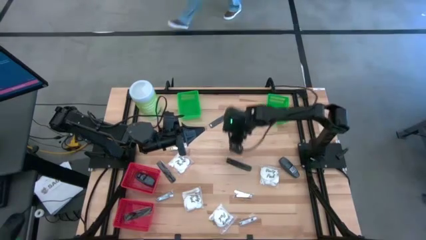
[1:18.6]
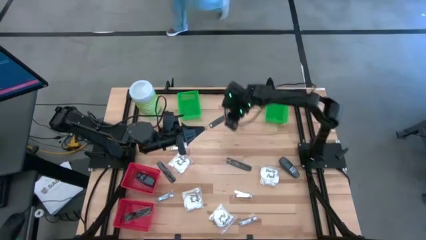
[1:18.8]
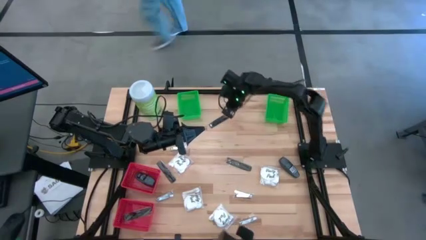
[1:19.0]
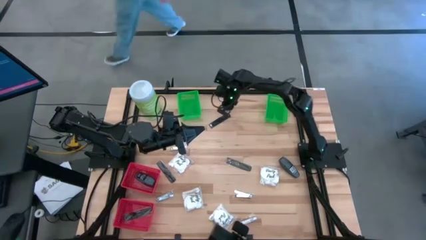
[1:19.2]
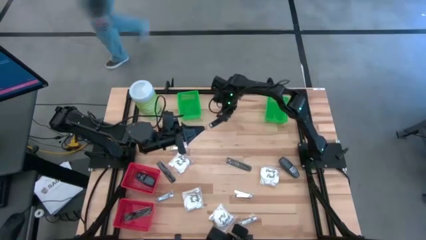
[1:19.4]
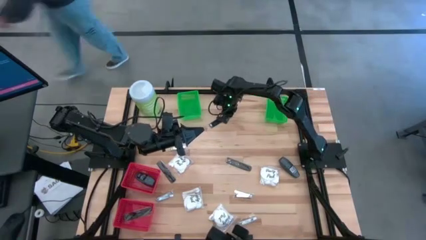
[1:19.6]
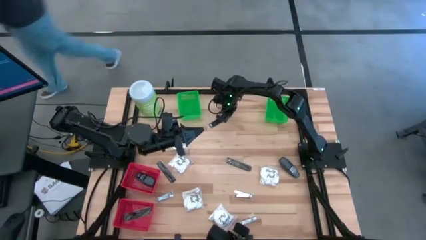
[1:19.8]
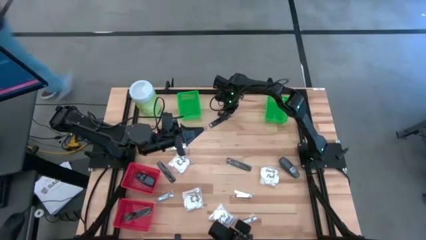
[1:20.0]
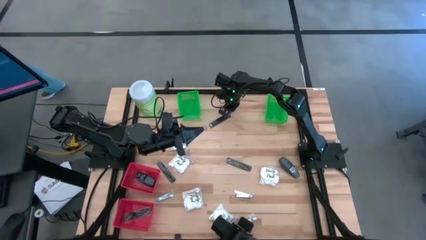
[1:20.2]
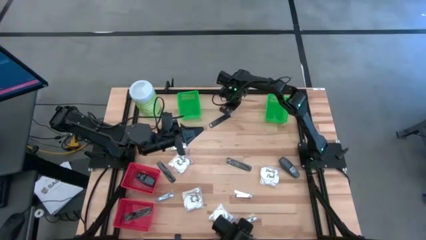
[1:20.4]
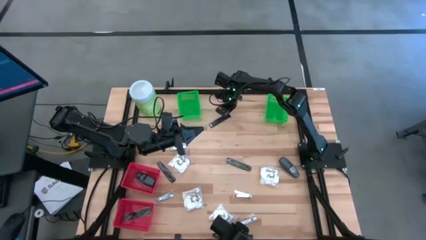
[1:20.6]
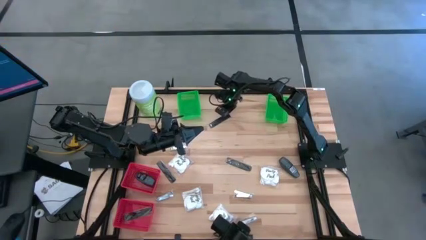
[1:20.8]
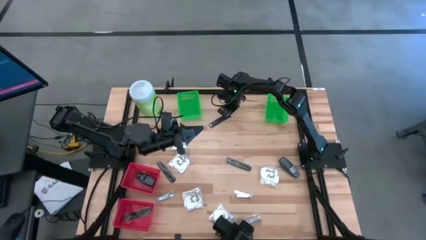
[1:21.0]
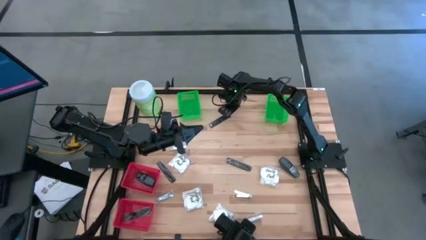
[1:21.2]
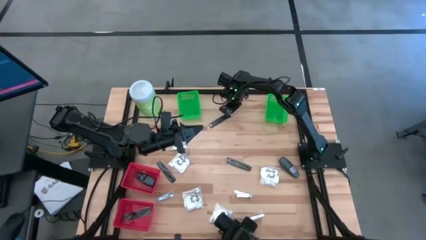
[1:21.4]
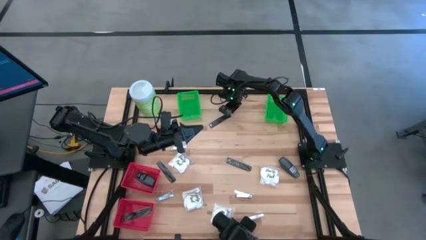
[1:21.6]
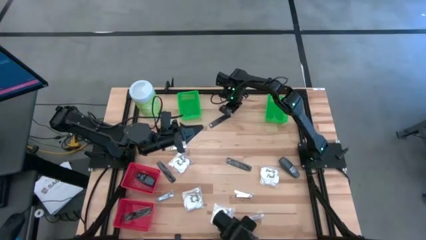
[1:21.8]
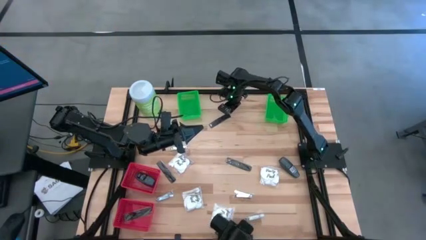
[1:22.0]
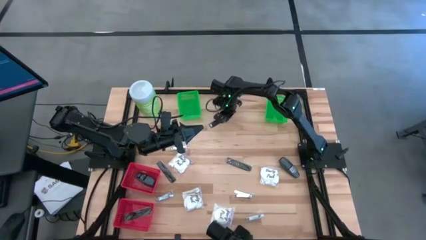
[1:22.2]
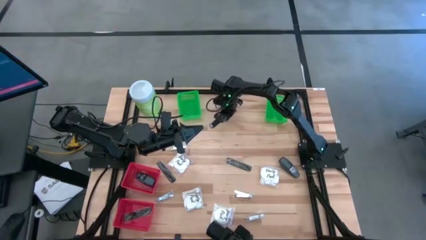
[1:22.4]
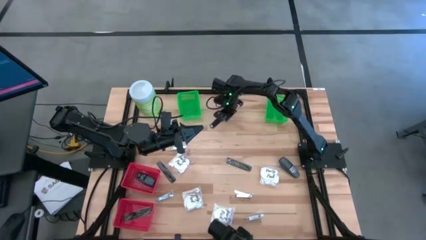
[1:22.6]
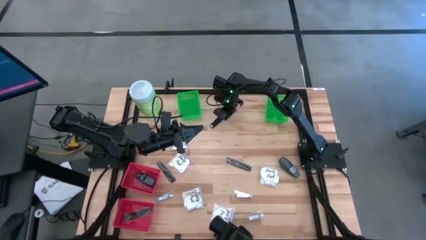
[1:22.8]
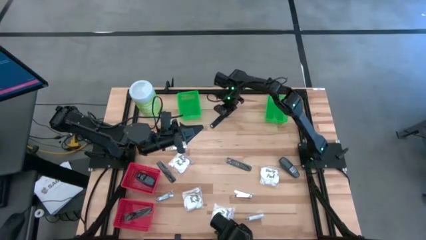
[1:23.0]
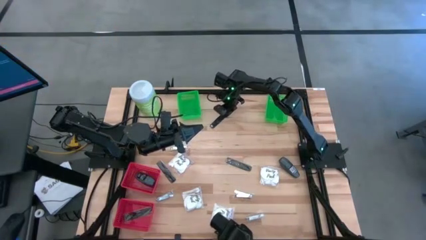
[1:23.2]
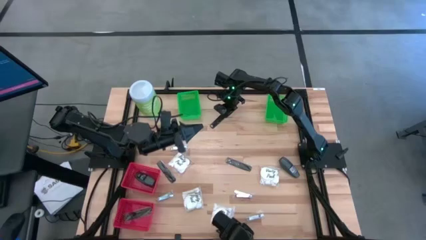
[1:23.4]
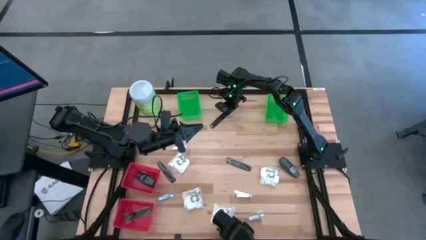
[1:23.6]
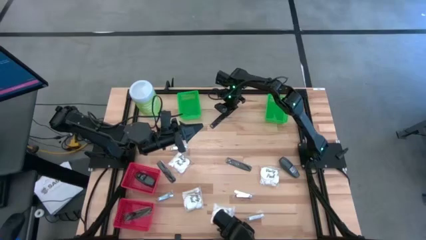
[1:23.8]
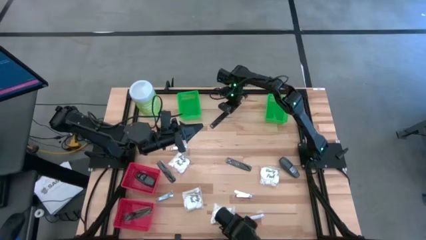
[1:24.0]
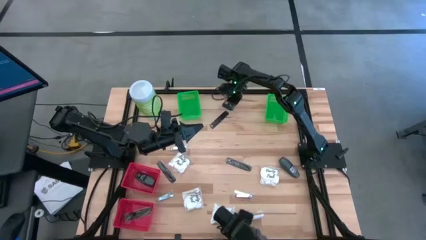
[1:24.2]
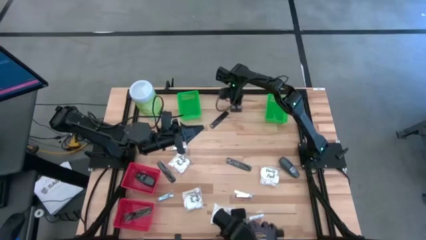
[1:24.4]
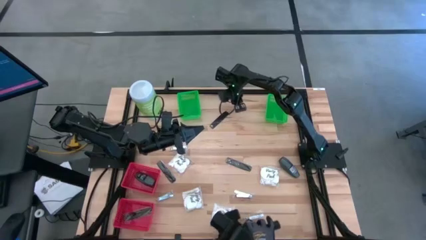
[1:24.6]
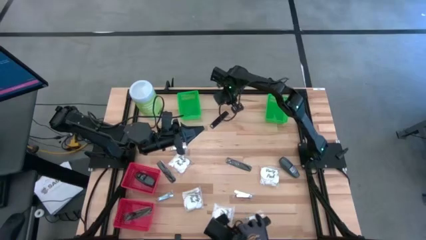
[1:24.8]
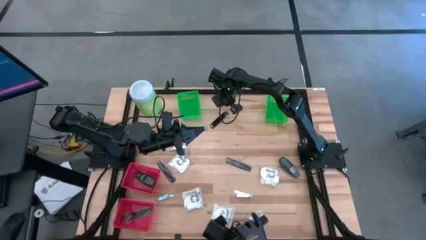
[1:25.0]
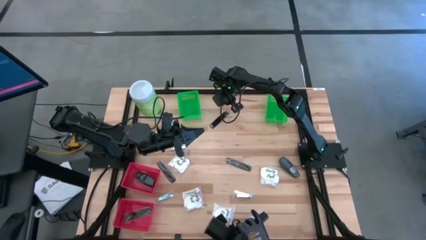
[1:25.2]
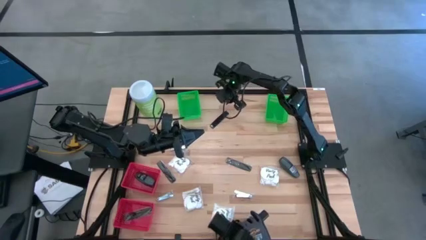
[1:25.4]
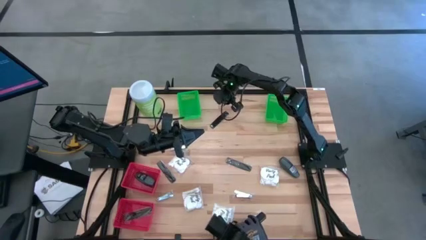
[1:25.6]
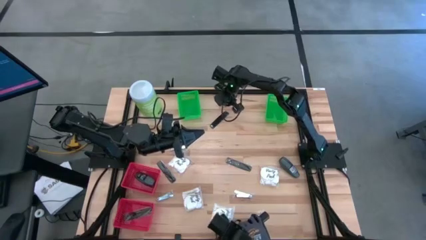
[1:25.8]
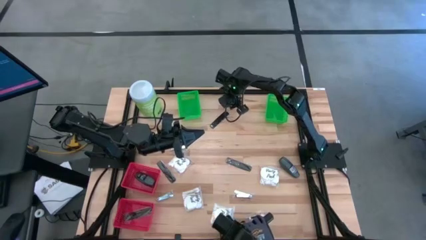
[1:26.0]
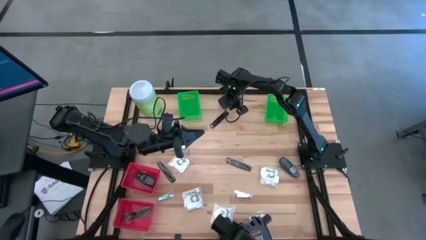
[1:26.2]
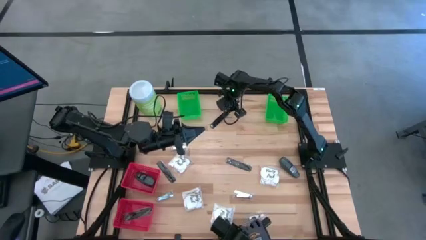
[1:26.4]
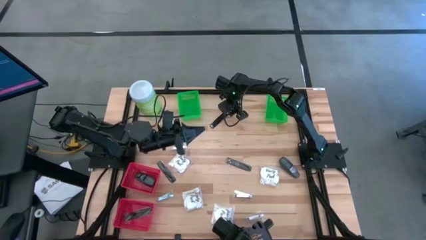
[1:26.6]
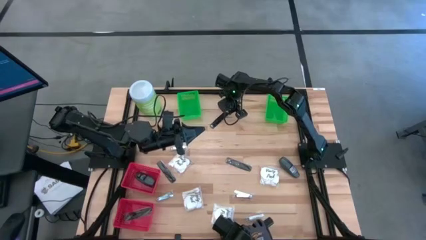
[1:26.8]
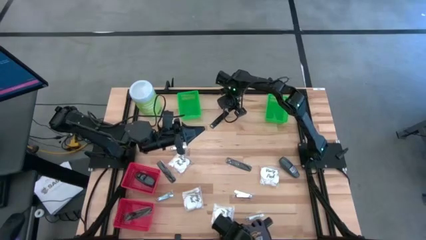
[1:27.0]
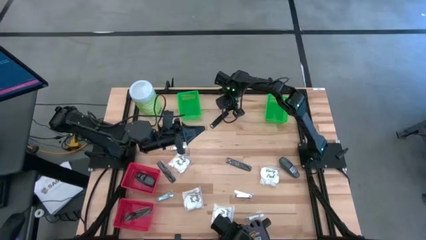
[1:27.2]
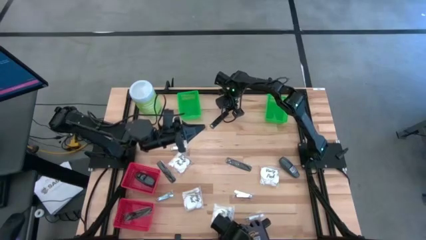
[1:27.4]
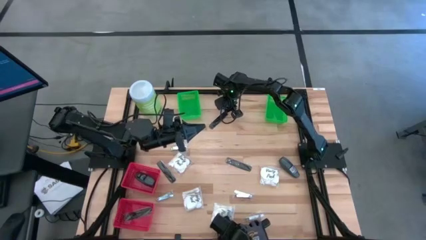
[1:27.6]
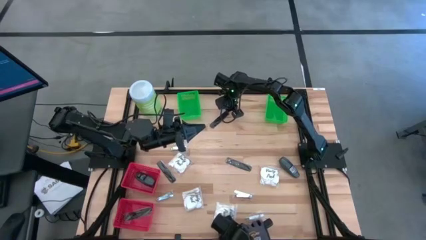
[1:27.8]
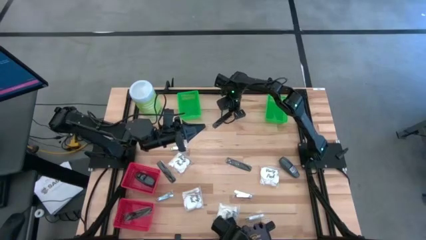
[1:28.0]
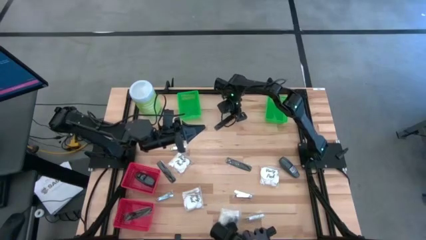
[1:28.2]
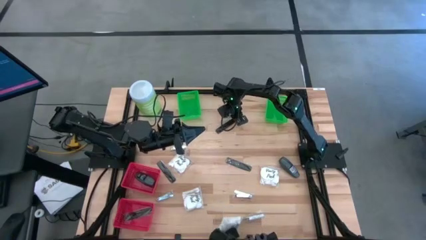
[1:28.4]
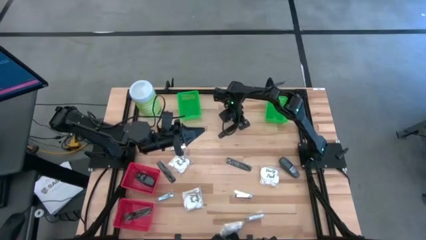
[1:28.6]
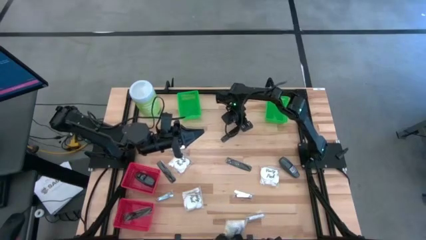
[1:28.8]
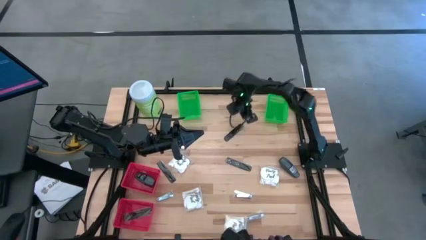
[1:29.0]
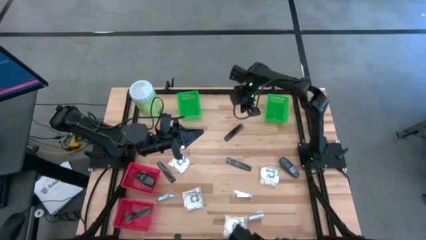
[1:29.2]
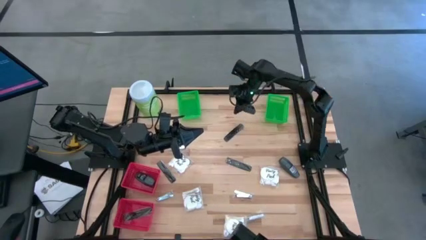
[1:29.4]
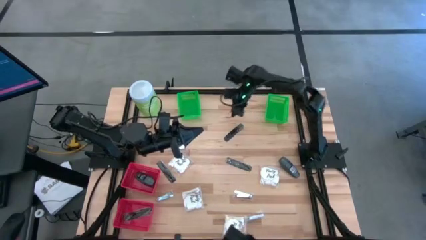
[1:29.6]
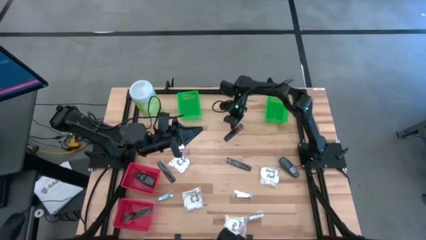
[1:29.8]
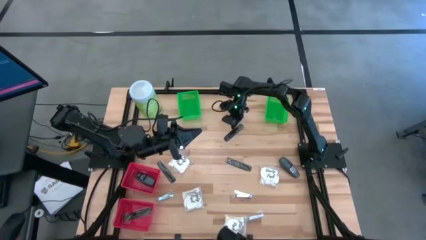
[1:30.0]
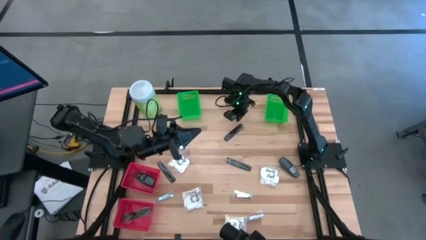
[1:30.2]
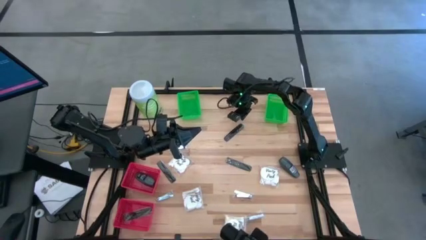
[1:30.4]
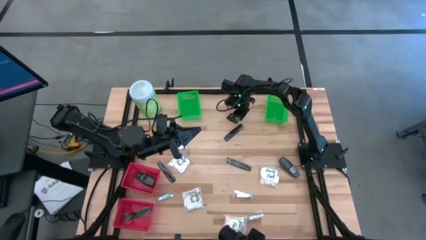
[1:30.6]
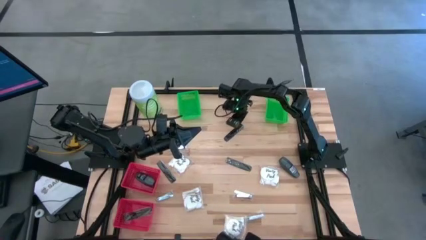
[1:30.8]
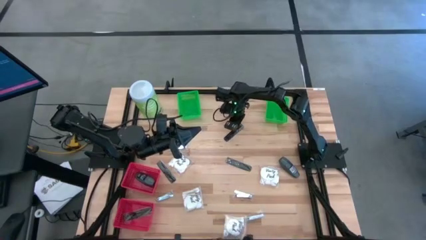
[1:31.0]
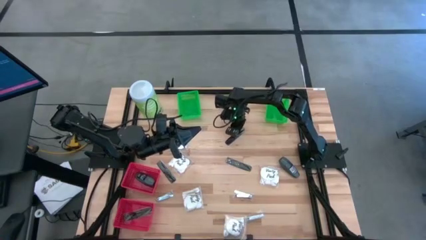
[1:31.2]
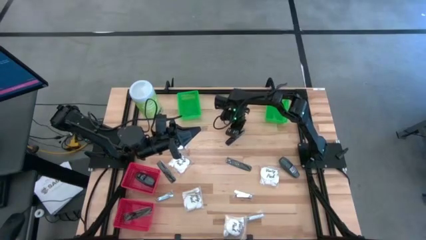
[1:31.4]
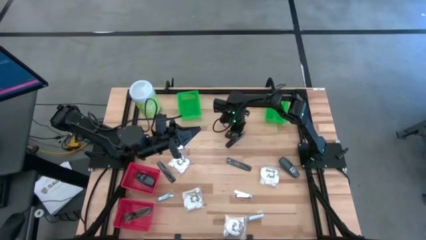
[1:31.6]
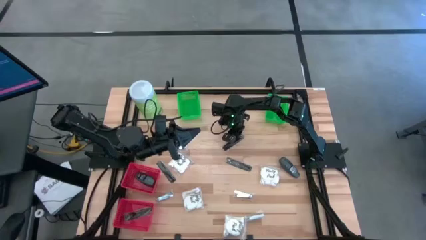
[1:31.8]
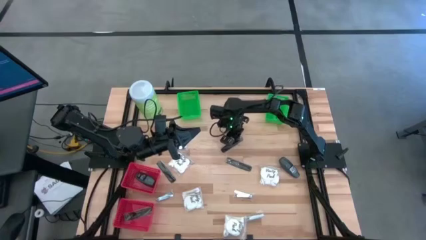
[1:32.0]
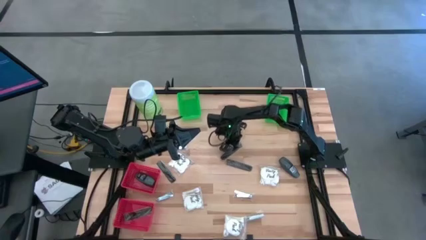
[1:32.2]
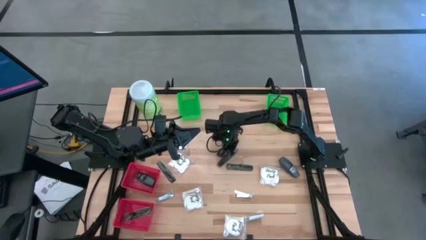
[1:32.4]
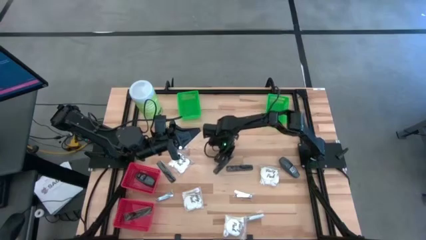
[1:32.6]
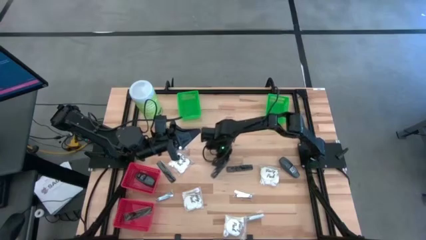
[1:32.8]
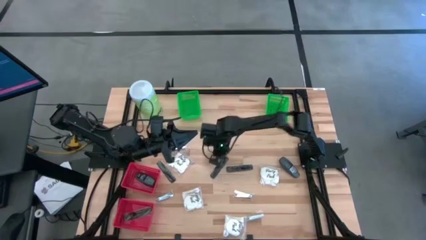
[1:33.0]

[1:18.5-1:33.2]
Task: Pick & Place Travel size toiletries
Move the black comb to the center of the table

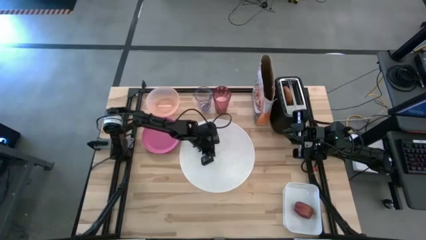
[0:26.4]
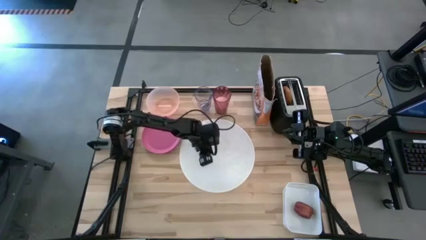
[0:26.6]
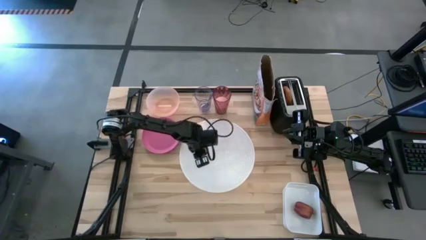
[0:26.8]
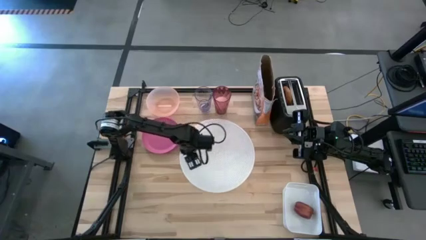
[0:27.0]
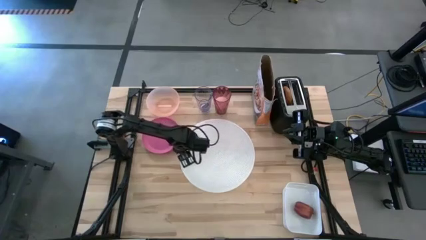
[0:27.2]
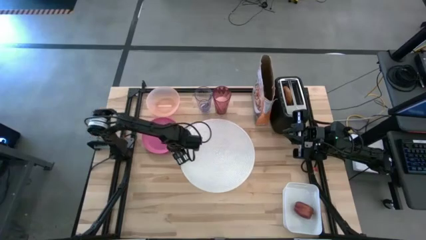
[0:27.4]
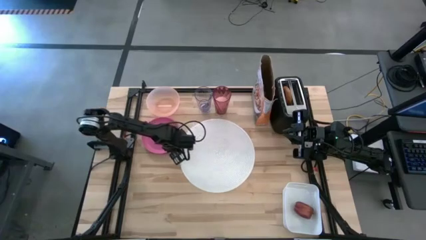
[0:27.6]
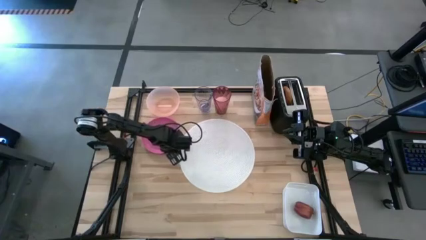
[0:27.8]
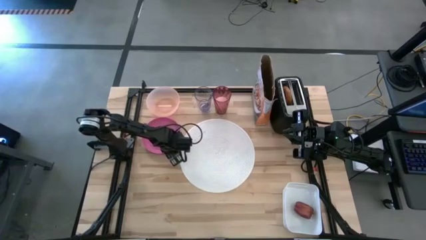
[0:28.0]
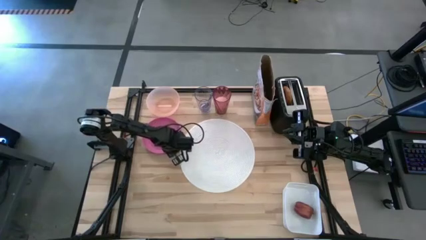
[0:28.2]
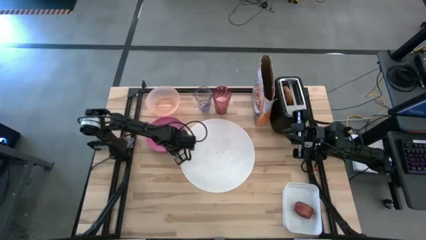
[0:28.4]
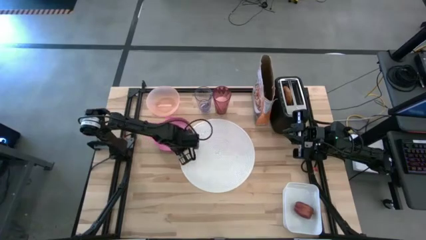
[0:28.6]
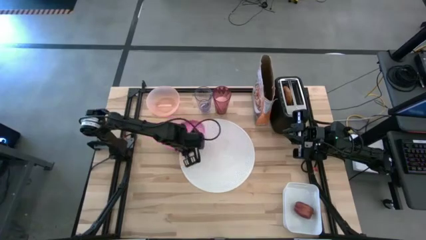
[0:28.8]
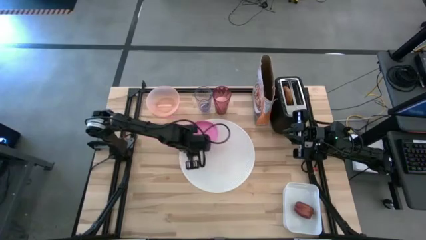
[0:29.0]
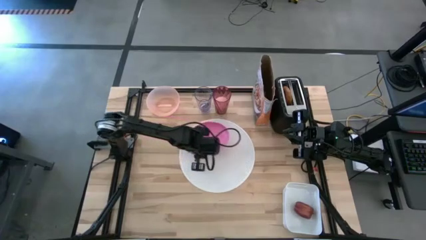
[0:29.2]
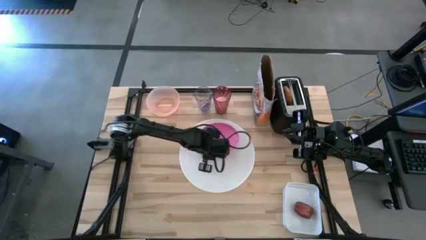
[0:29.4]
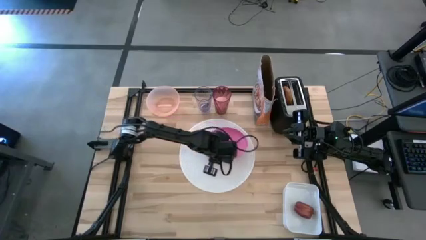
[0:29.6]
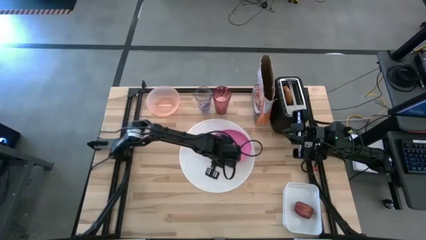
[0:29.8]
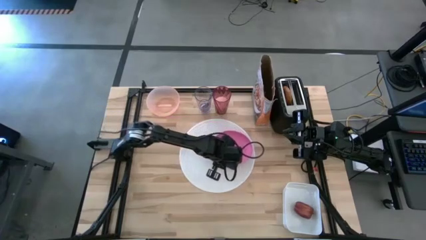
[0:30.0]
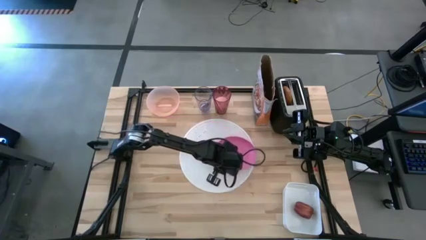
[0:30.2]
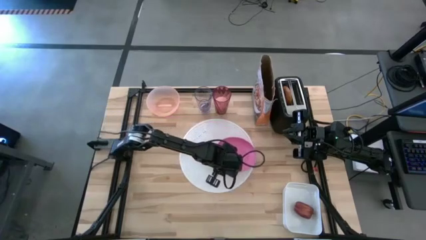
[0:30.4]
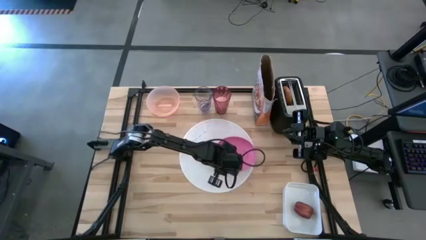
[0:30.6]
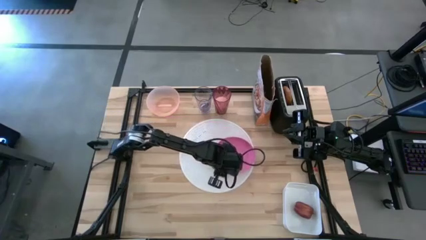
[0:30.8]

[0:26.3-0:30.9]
Task: Arrange a breakfast setting
Put the pink plate on the white table mat
